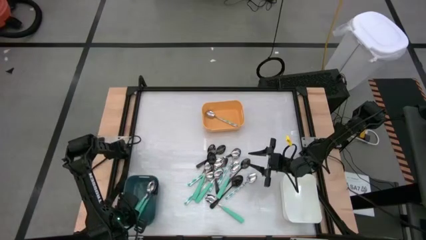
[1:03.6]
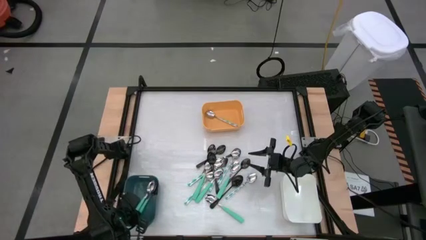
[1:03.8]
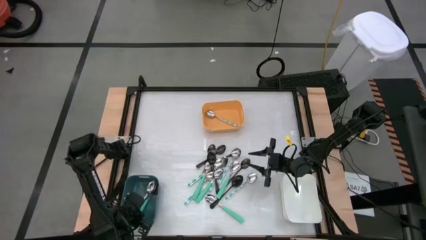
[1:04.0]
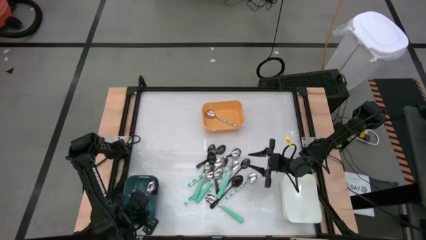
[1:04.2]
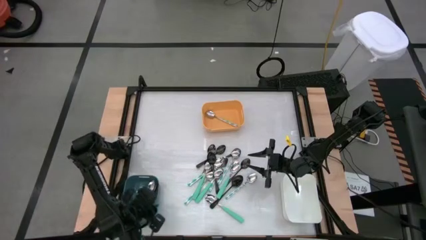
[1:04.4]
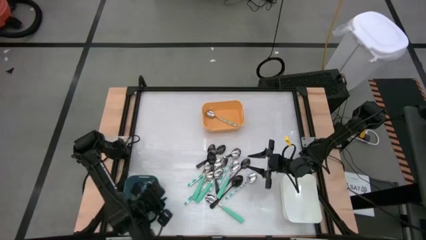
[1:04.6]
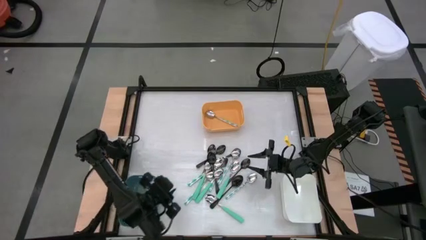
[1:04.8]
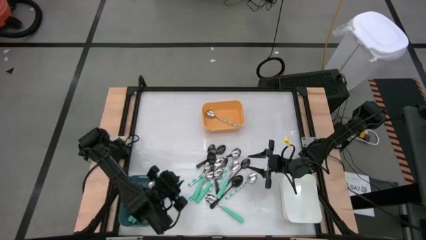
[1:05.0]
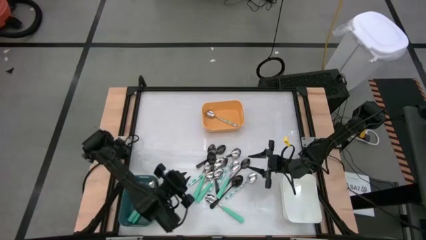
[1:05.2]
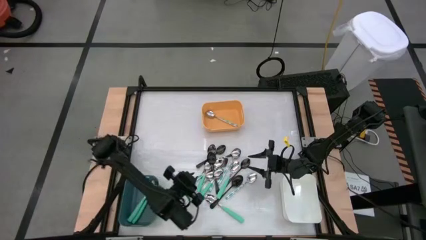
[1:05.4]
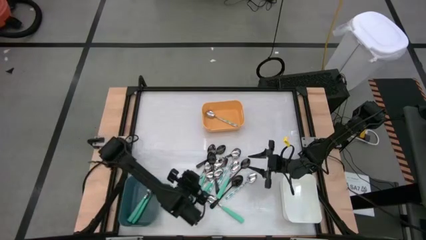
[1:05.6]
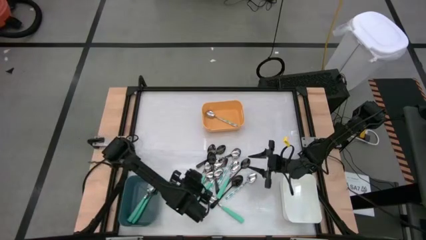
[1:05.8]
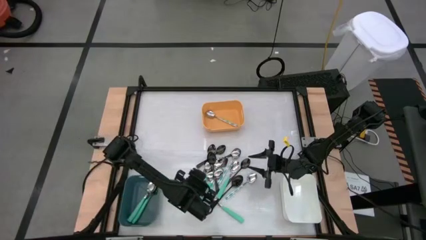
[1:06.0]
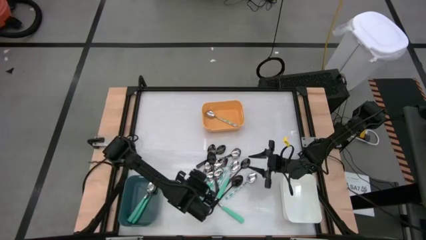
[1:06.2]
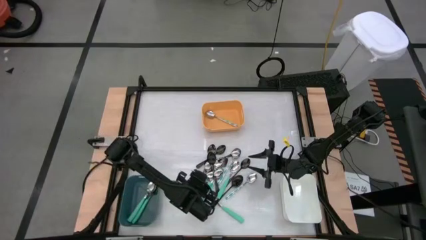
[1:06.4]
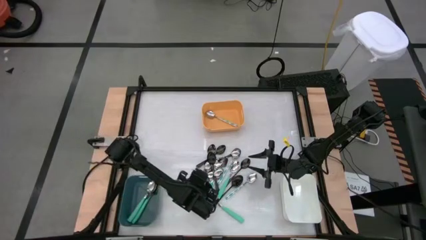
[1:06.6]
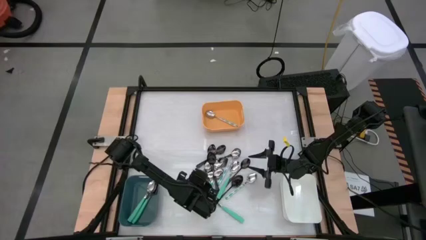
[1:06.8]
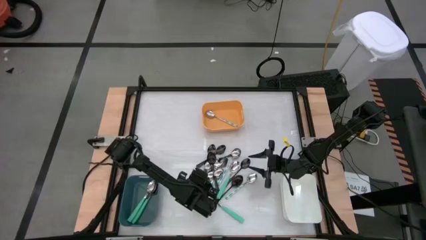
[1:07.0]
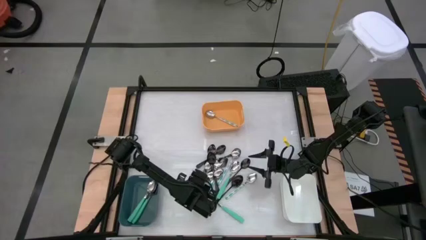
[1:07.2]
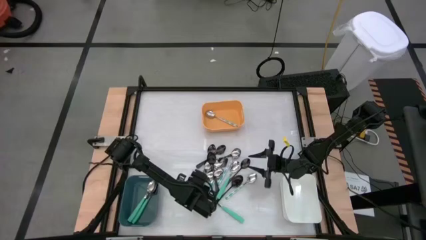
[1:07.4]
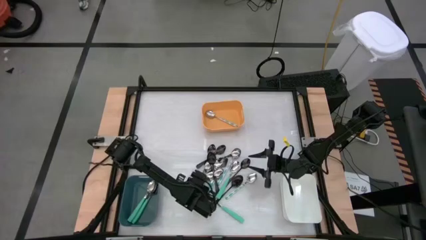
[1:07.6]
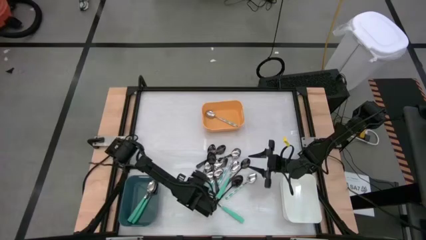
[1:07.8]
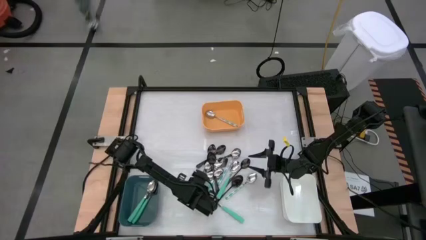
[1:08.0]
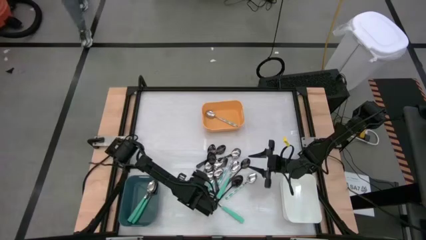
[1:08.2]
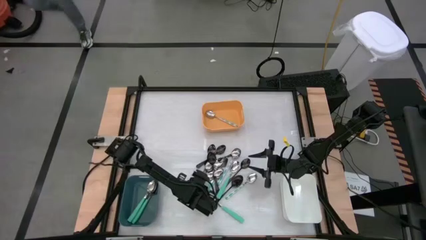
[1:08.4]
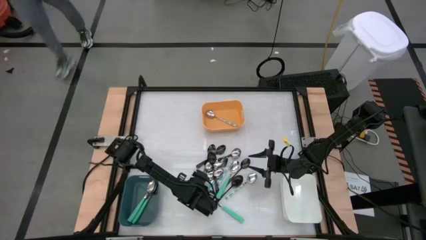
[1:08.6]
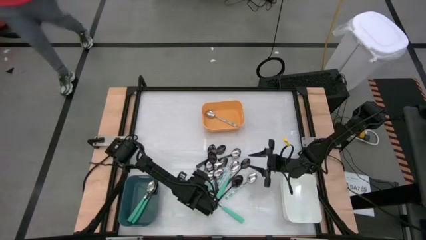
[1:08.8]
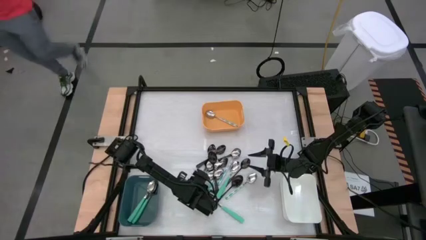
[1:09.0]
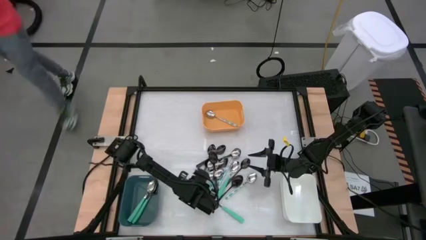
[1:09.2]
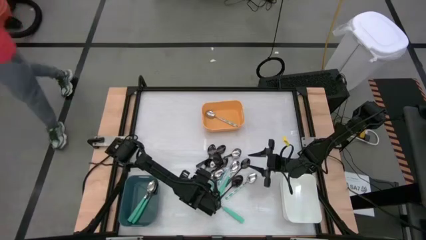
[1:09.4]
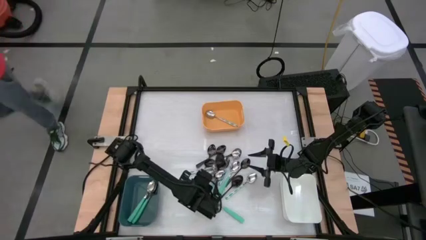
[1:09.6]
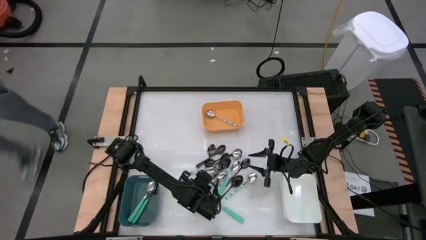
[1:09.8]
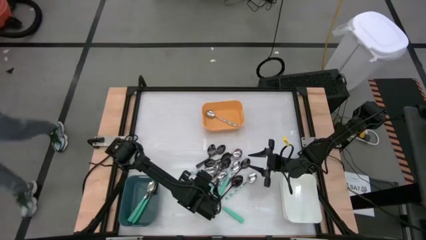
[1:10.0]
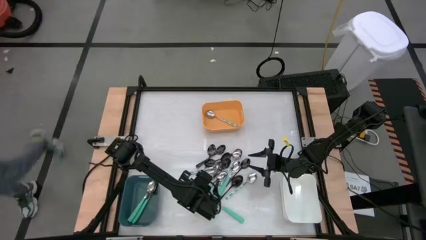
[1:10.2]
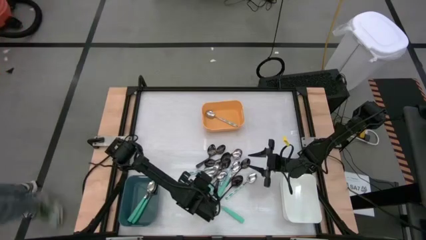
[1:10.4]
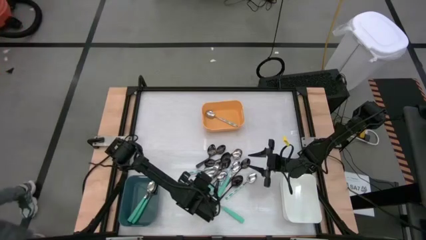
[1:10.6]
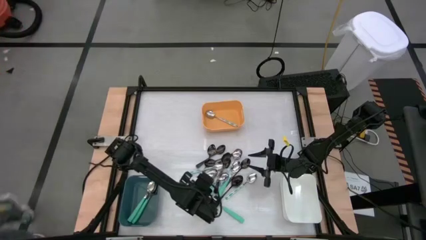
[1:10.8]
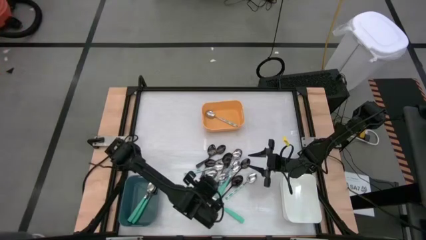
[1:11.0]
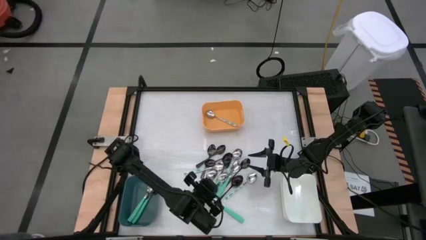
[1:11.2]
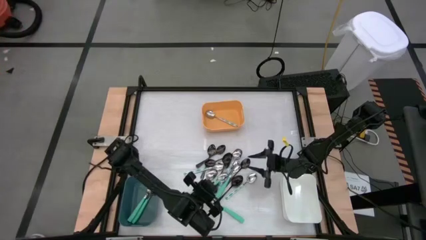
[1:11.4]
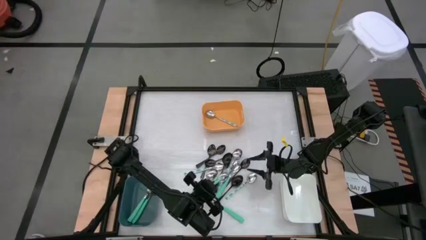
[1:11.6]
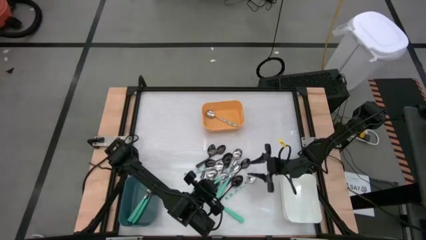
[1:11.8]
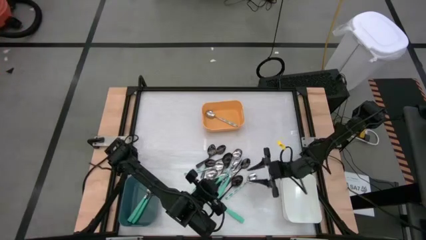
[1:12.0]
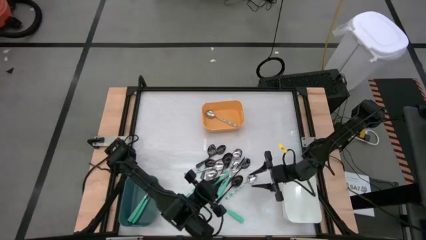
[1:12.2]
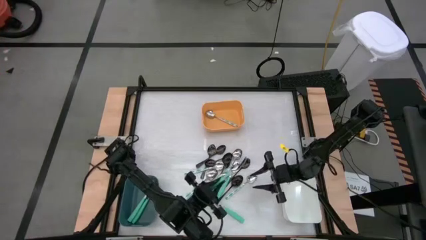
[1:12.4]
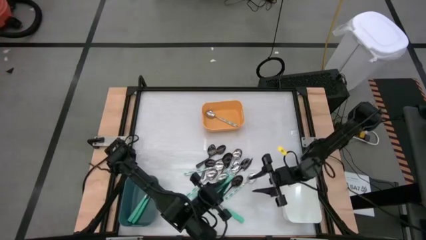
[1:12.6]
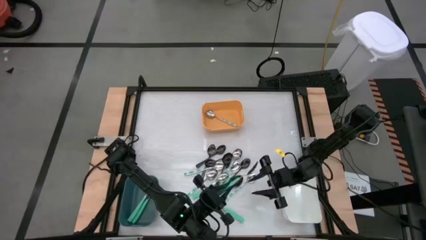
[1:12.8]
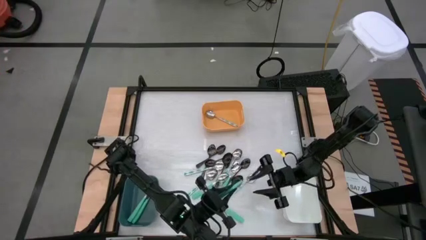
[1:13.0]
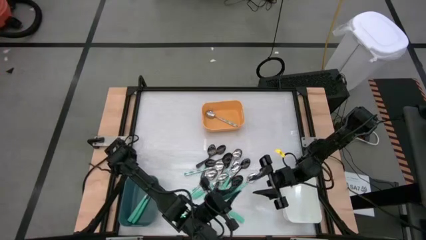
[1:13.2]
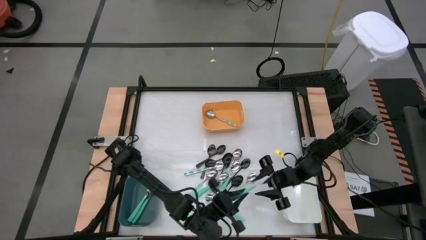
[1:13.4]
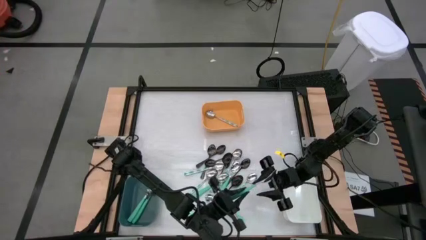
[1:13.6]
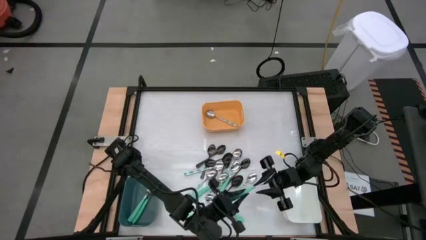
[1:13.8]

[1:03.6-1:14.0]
Task: Sort silverware by color (type)
Put the green spoon into the blue bin

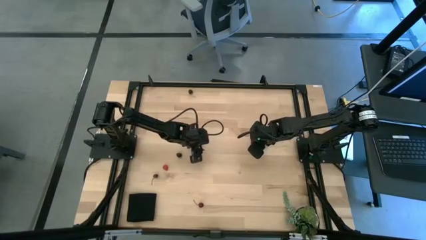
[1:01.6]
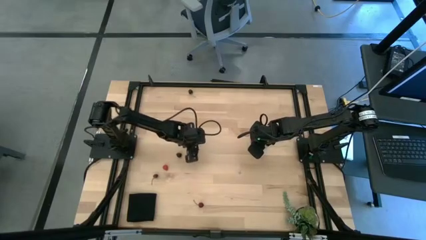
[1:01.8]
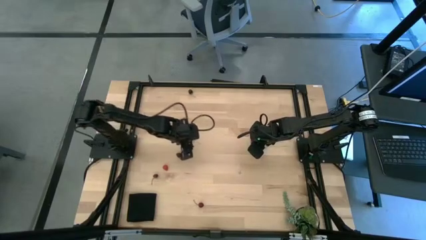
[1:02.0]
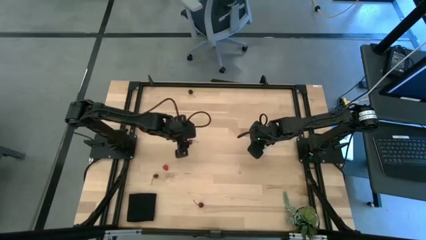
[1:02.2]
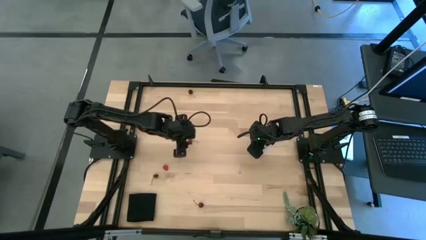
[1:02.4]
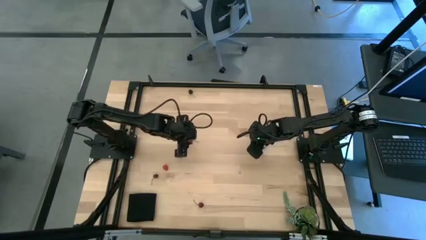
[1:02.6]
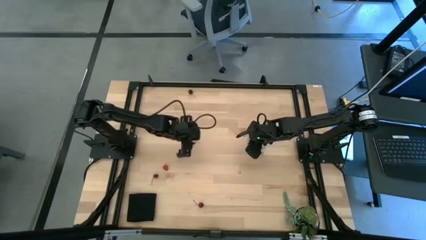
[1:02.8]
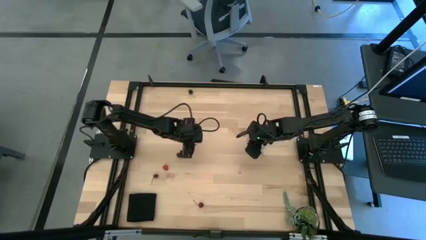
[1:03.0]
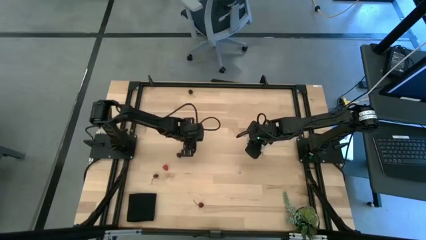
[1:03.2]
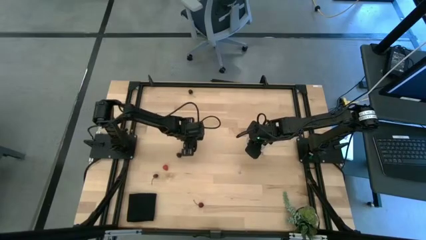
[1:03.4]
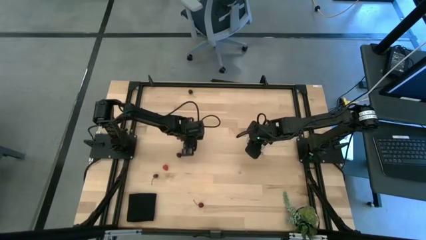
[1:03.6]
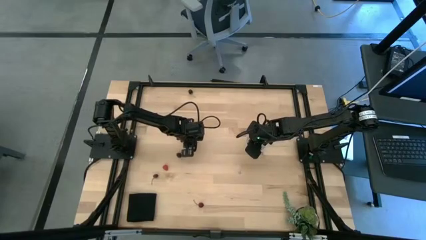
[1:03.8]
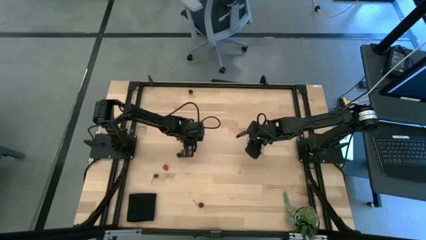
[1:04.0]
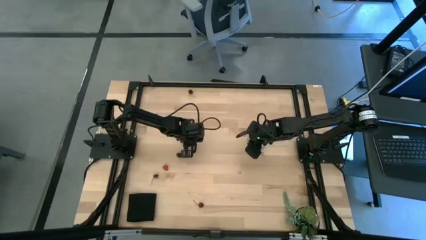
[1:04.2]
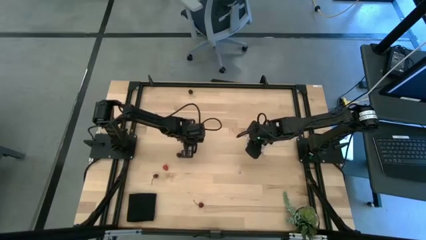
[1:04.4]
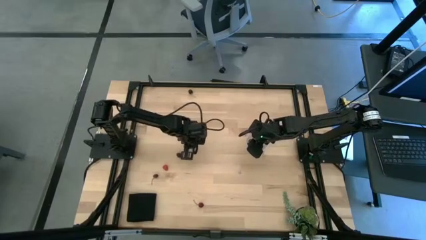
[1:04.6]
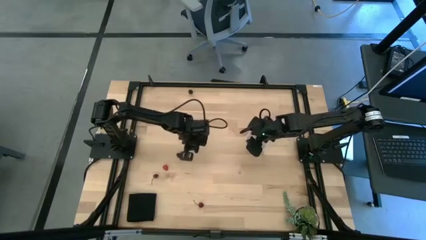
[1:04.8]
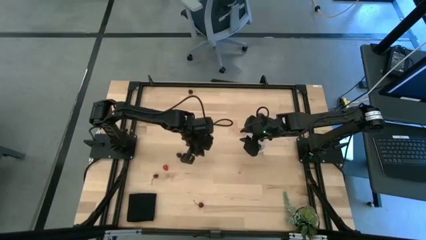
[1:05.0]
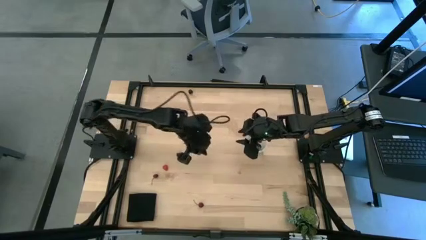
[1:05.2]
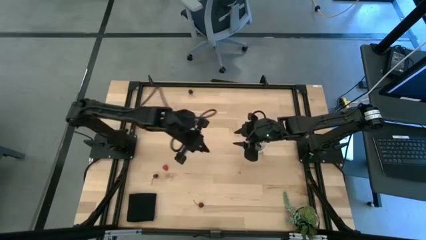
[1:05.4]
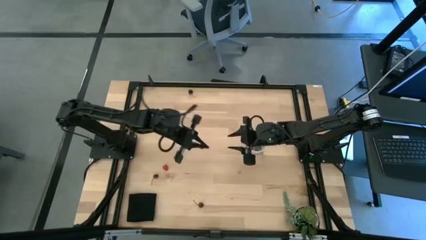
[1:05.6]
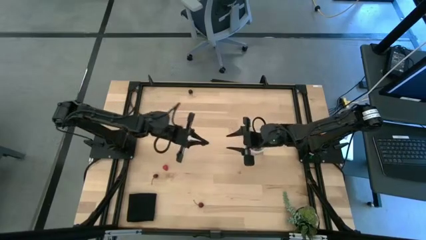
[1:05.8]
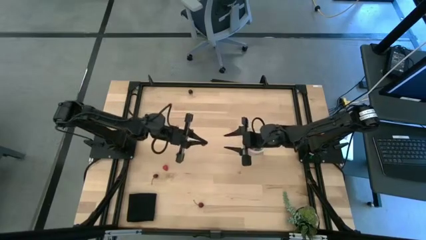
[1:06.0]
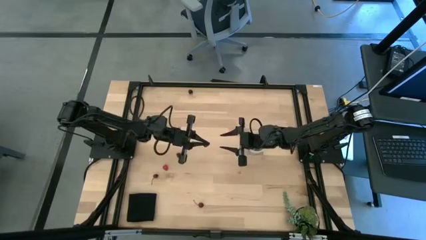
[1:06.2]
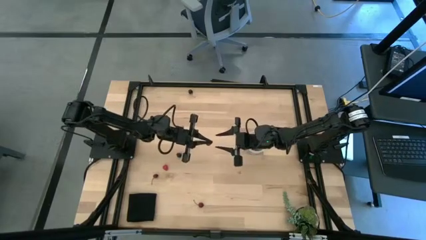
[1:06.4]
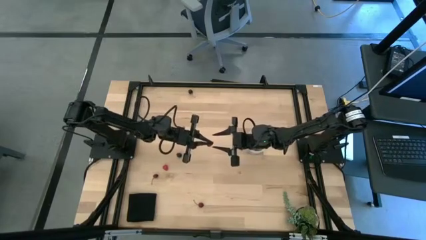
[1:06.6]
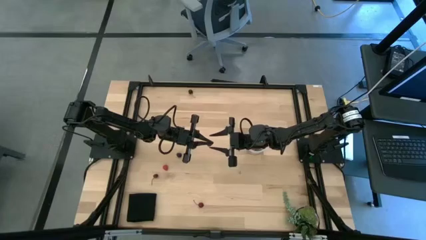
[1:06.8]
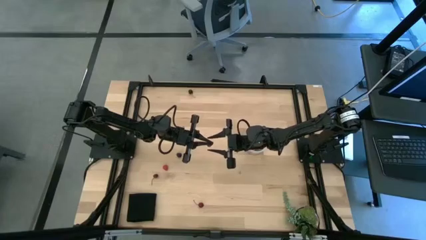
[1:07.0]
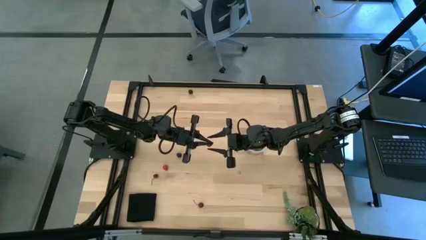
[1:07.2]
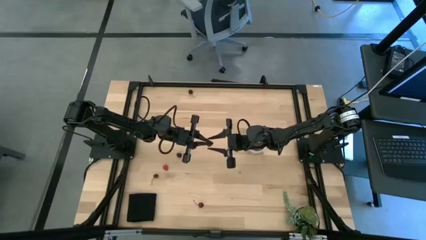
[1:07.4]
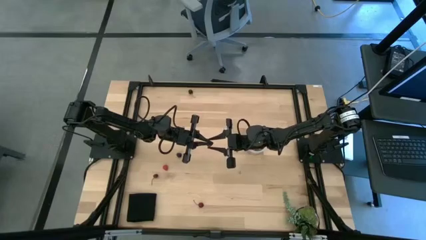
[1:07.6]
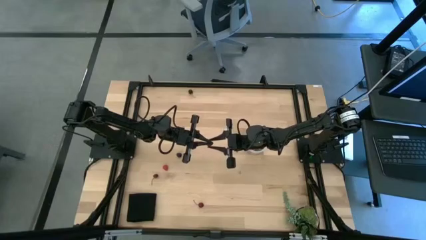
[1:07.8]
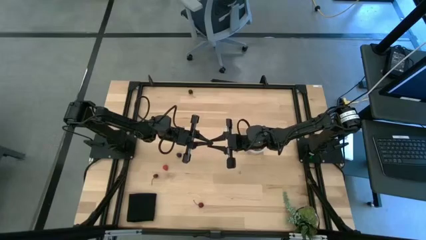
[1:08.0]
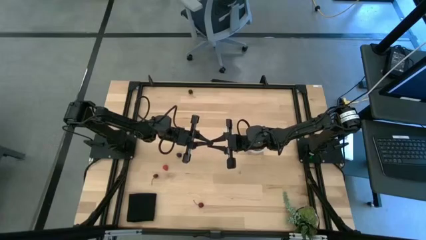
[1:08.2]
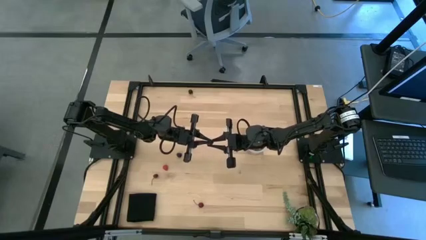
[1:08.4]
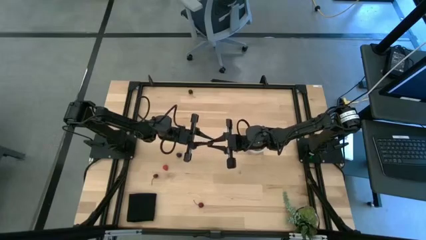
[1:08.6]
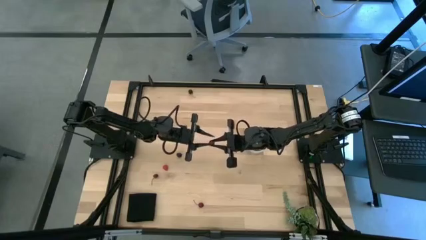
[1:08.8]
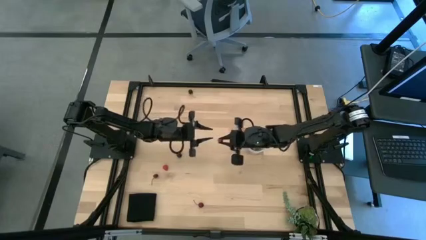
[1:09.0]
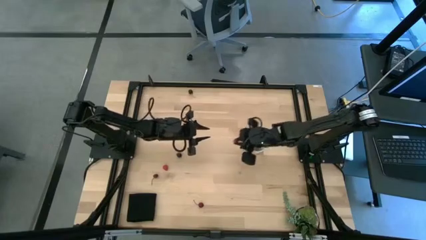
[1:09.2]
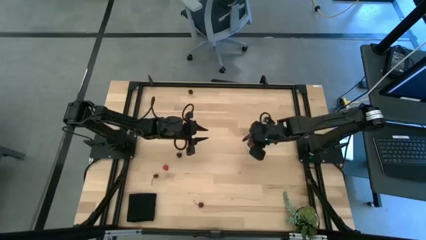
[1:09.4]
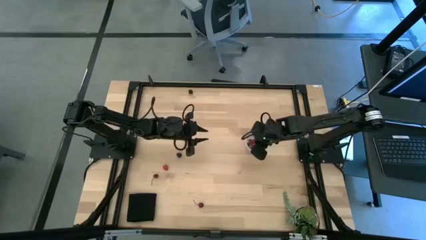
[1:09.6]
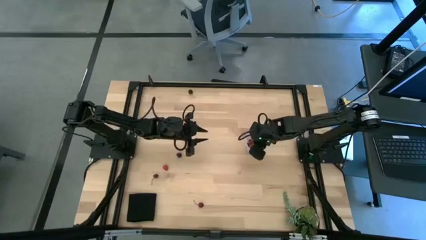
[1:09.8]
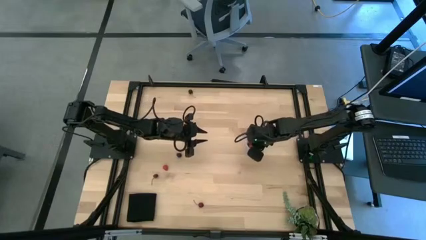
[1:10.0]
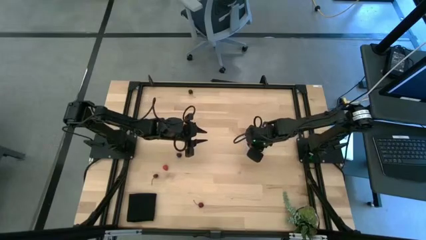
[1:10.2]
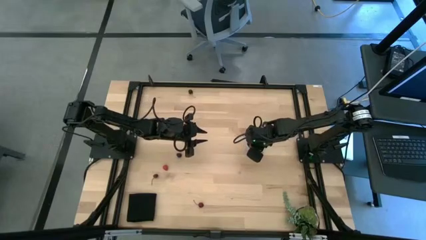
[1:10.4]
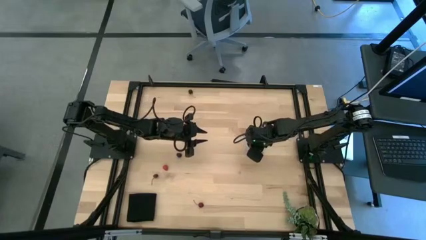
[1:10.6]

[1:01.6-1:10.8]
Task: Pick and placing Produce into tupperware
Put the red cherry into the transparent bucket
